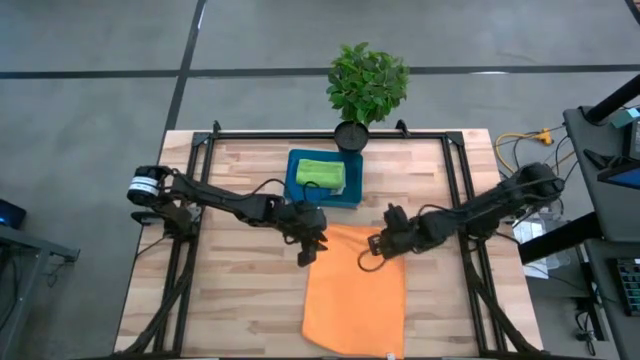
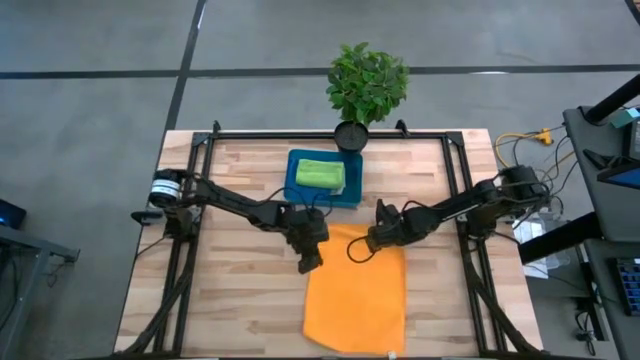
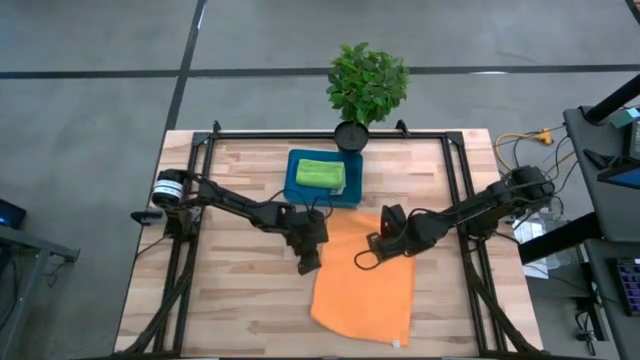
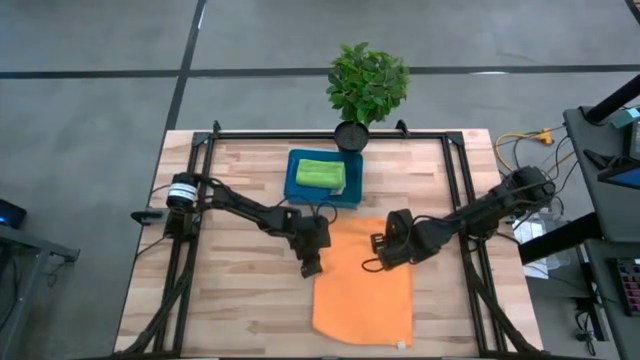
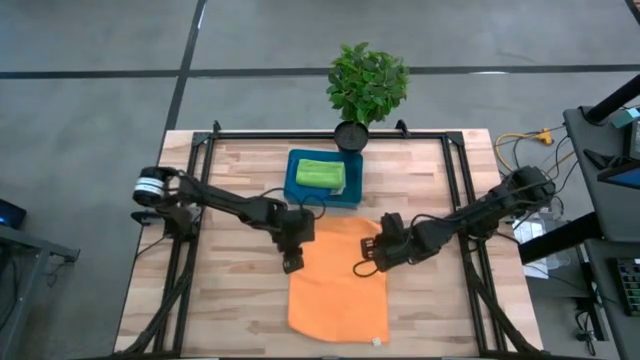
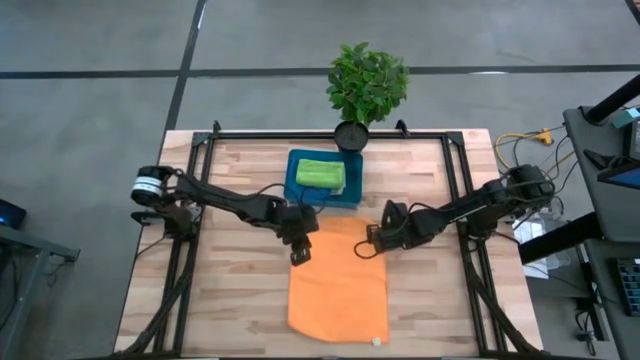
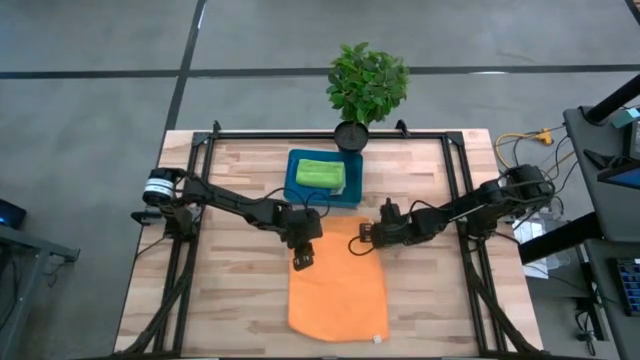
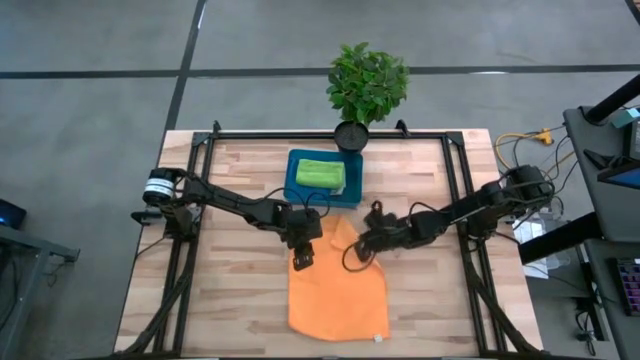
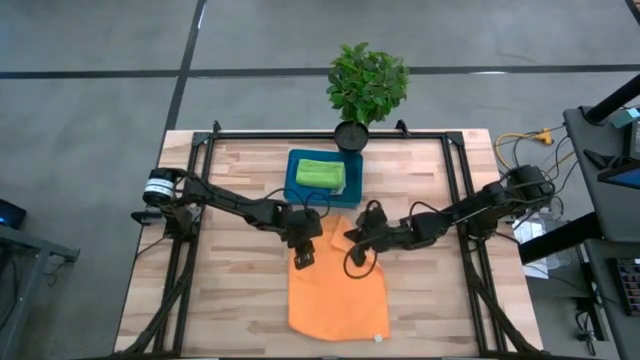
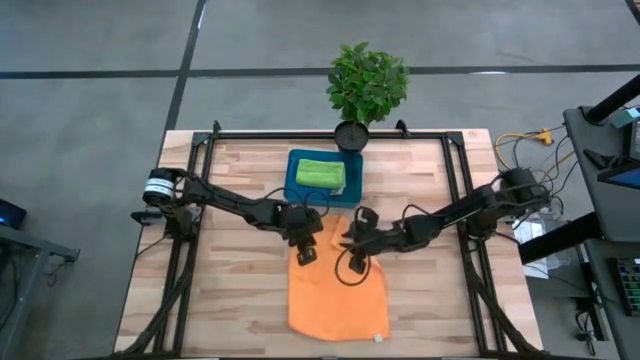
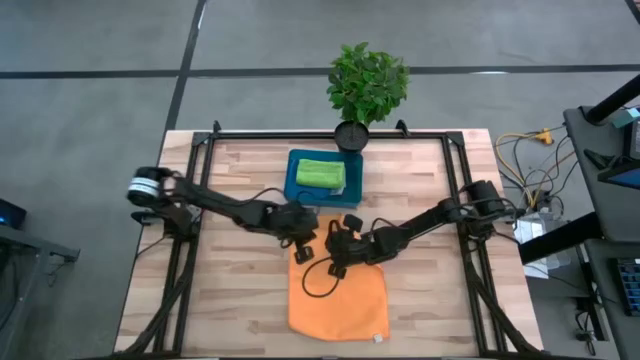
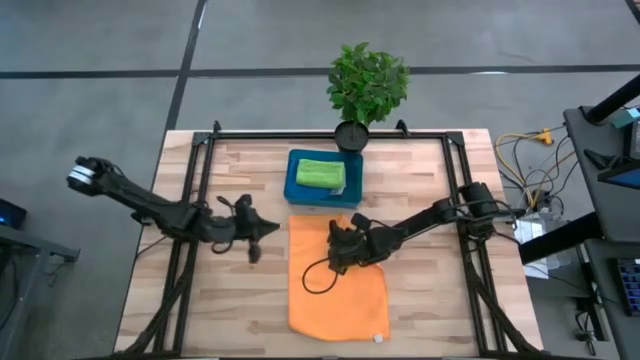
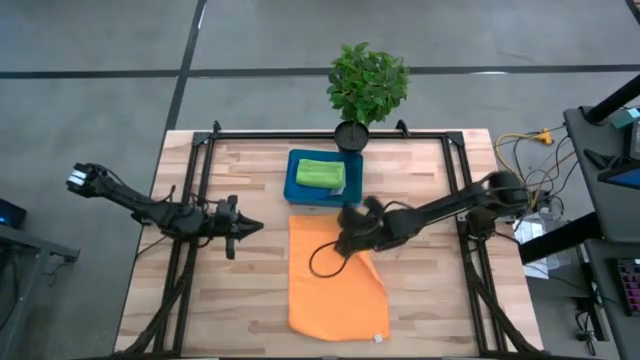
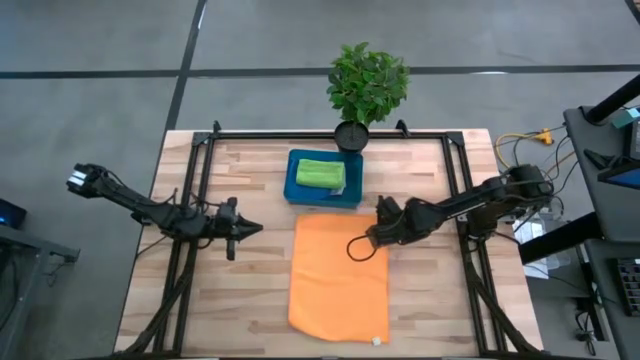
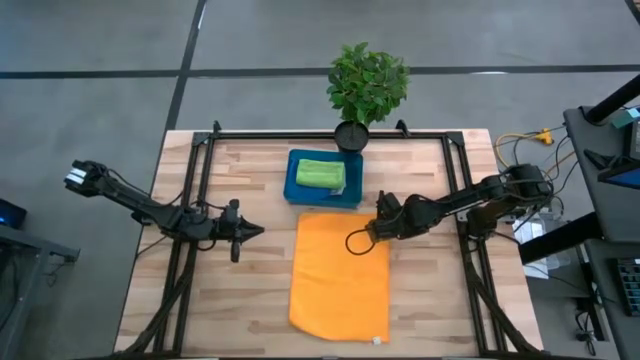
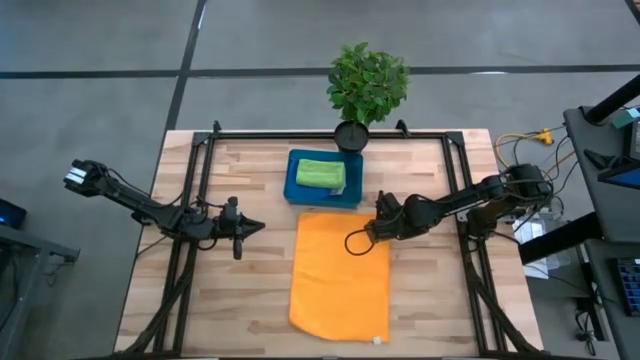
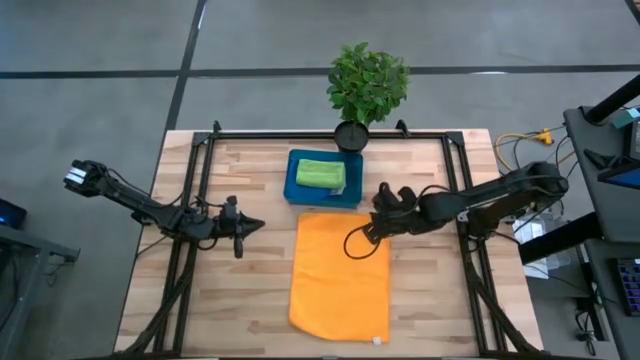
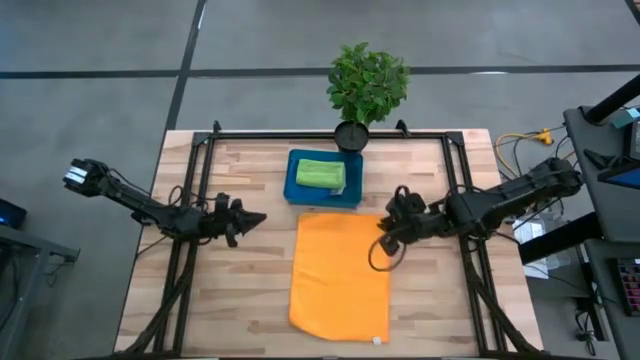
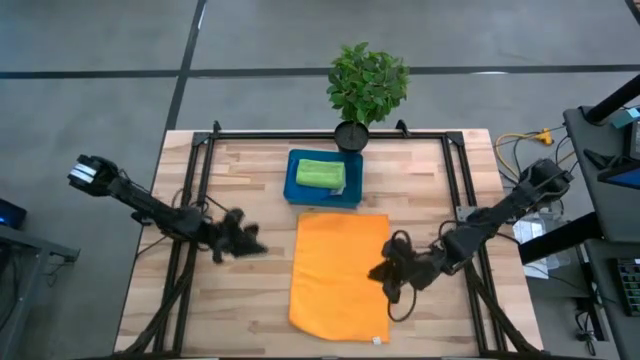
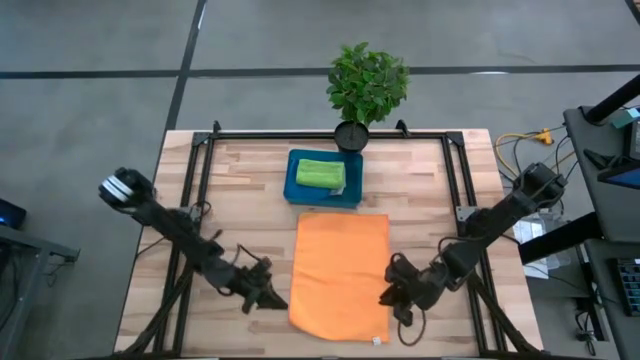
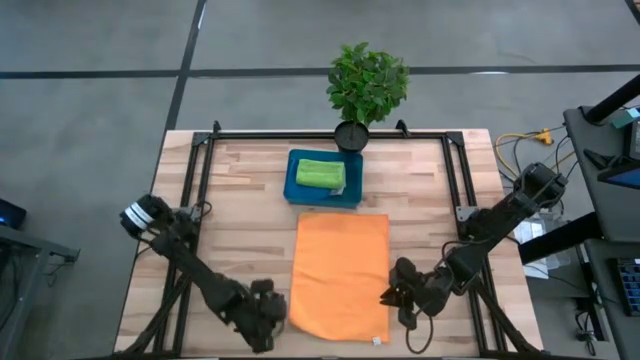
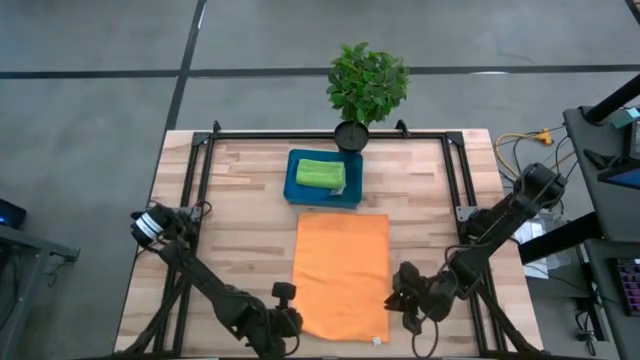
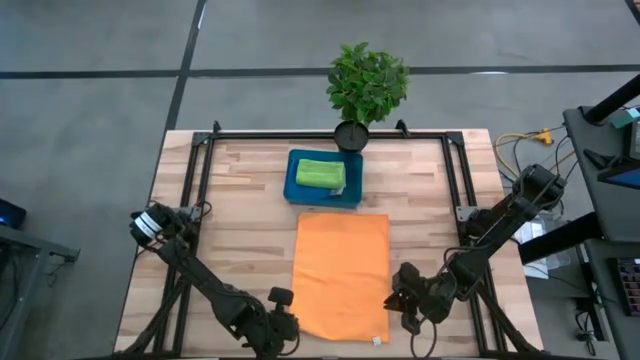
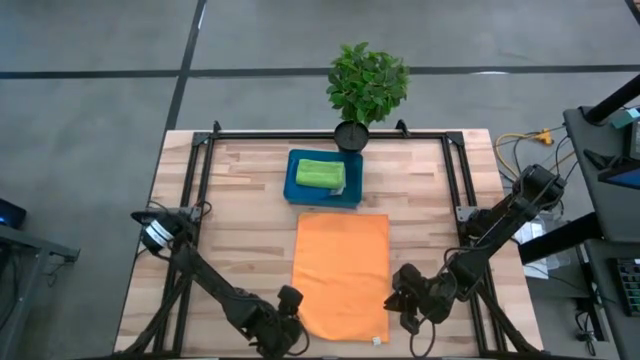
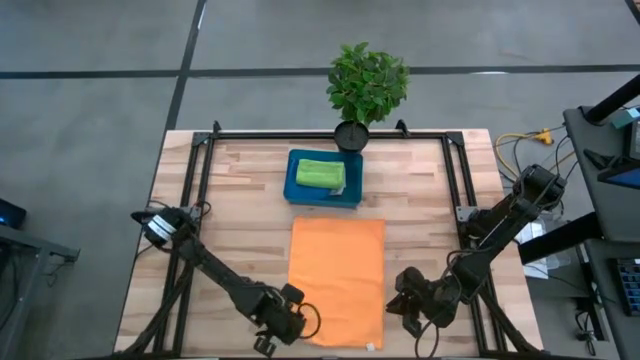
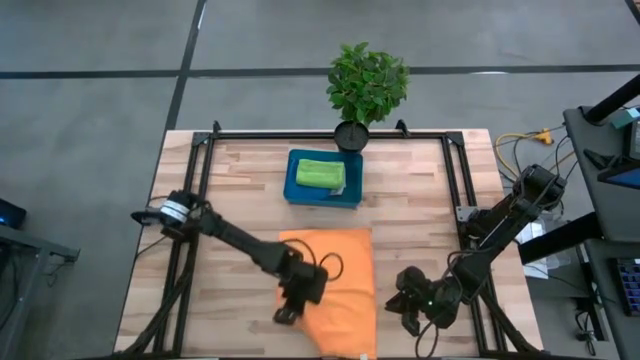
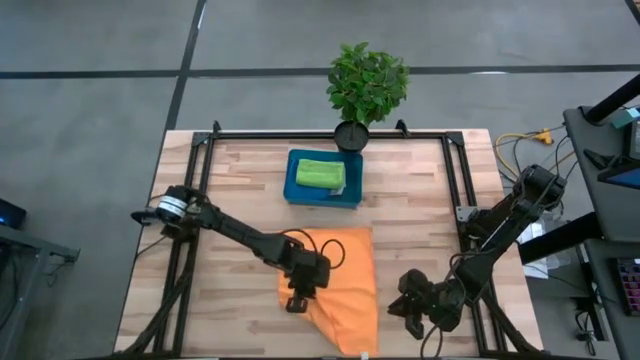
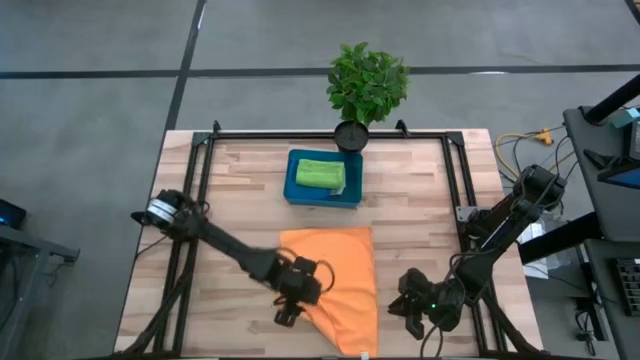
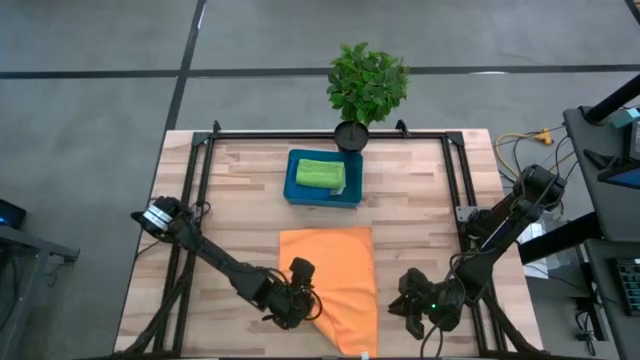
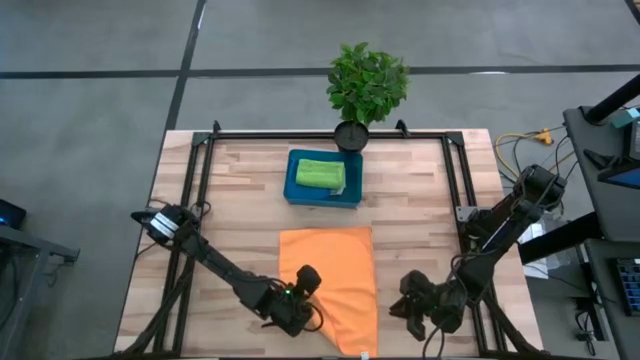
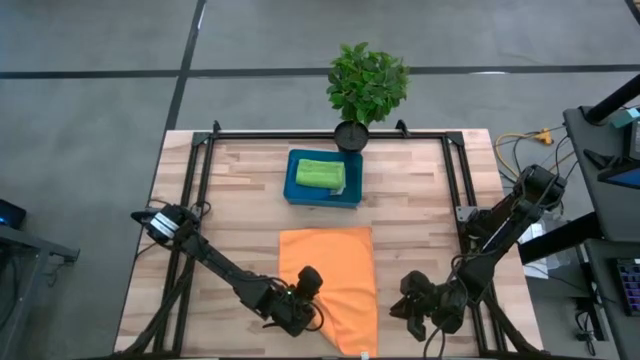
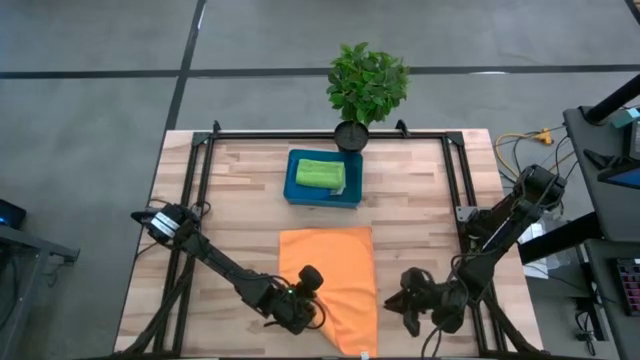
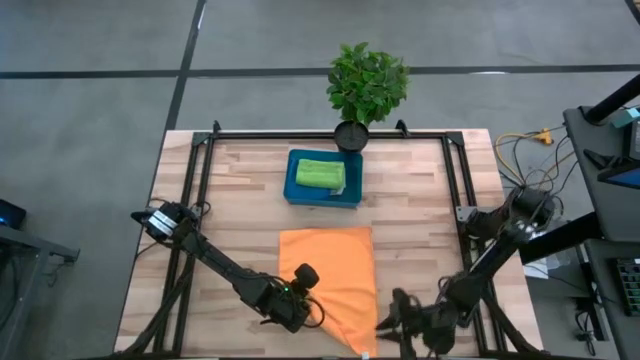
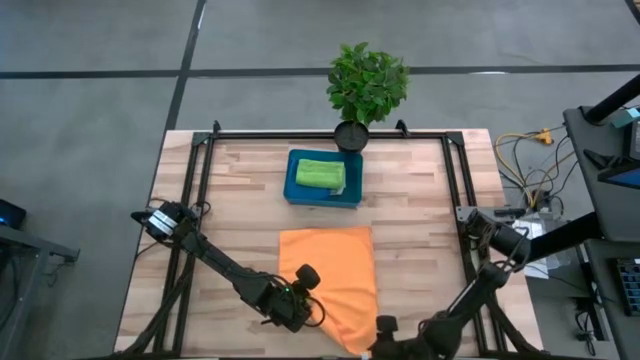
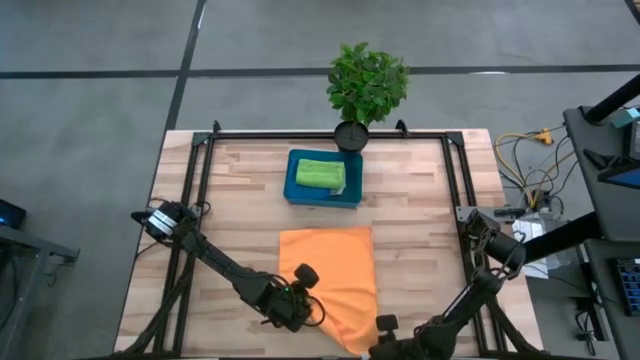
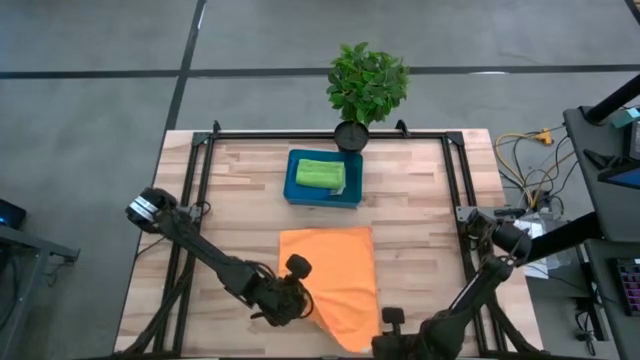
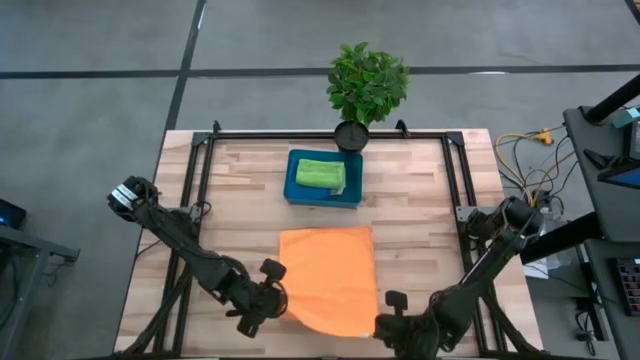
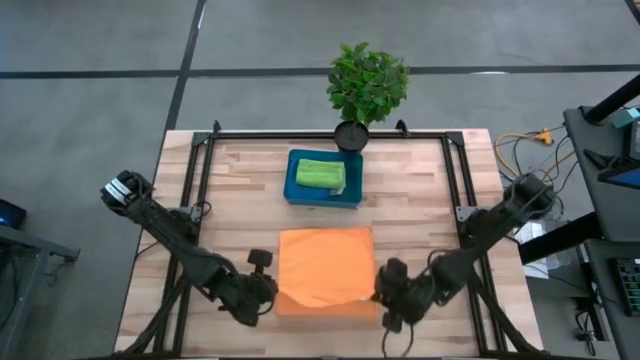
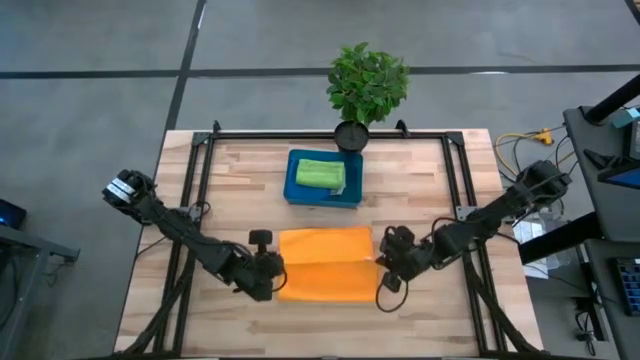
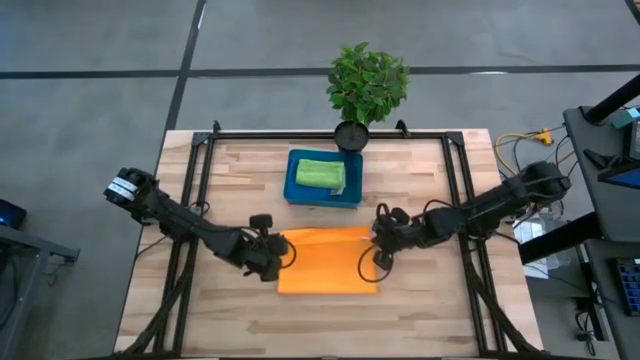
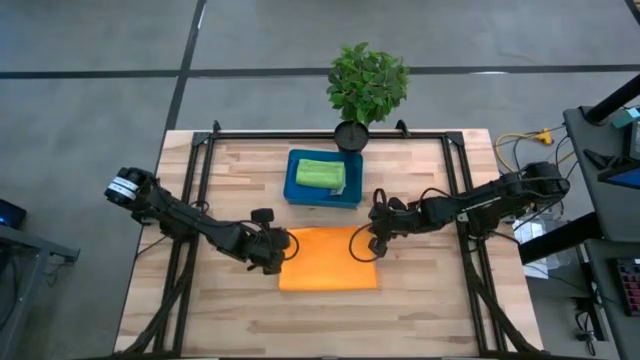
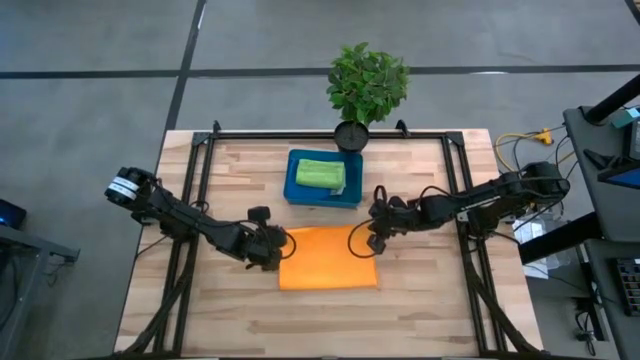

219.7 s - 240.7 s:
Task: Fold microfiber towels
Fold the yellow microfiber towel
